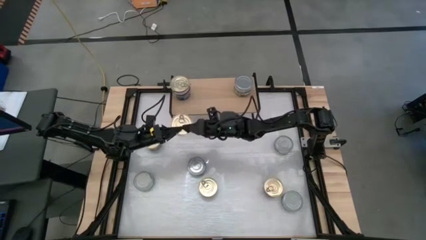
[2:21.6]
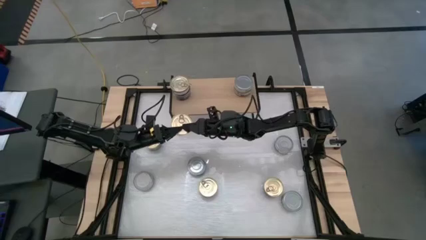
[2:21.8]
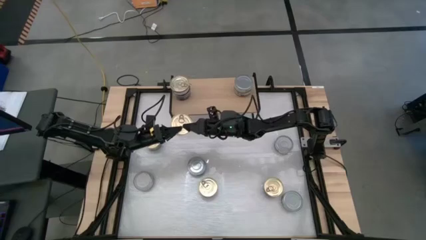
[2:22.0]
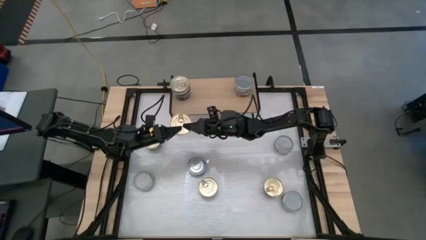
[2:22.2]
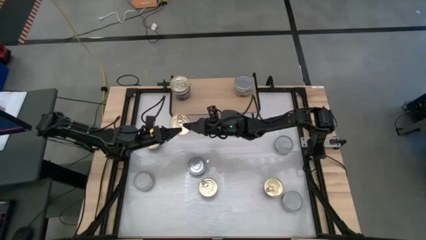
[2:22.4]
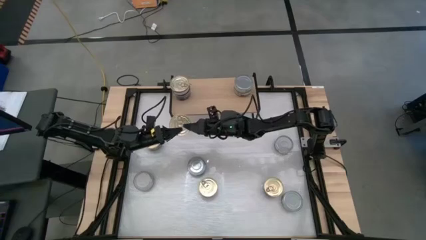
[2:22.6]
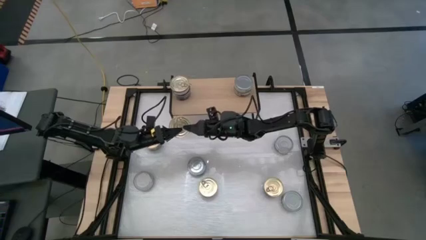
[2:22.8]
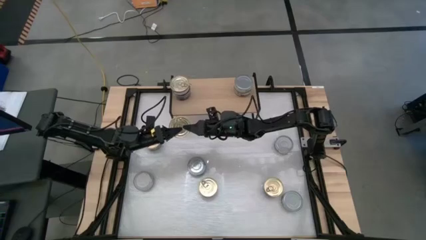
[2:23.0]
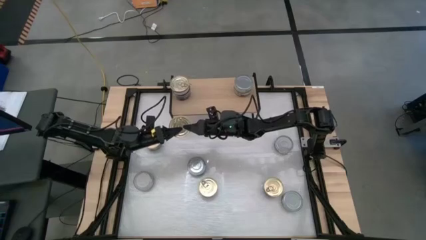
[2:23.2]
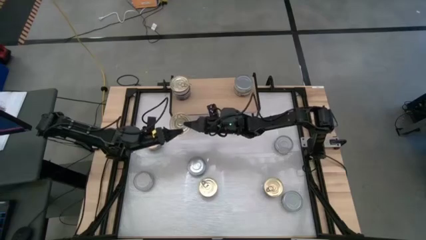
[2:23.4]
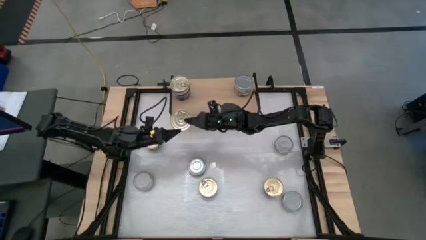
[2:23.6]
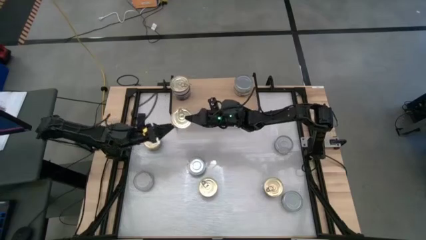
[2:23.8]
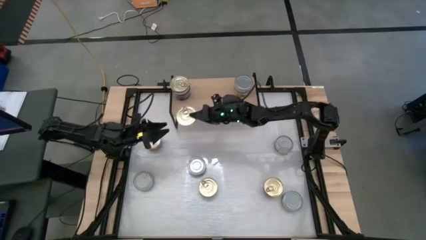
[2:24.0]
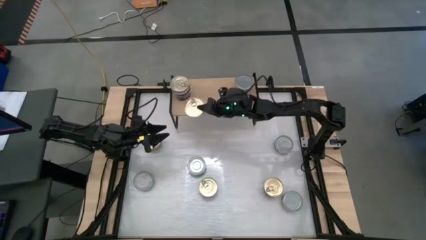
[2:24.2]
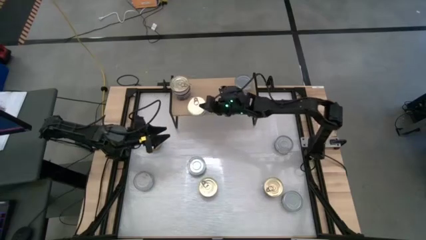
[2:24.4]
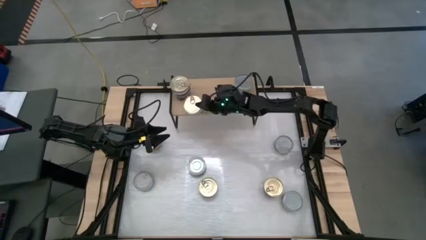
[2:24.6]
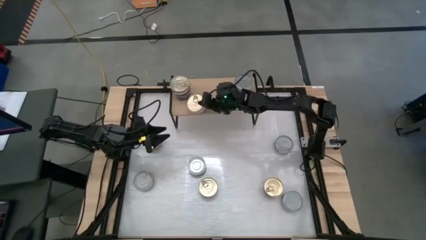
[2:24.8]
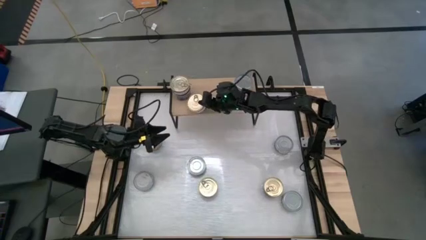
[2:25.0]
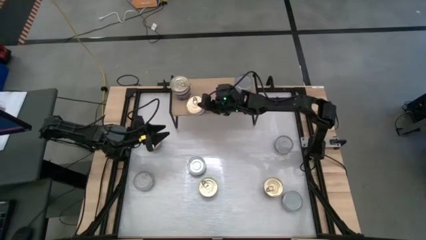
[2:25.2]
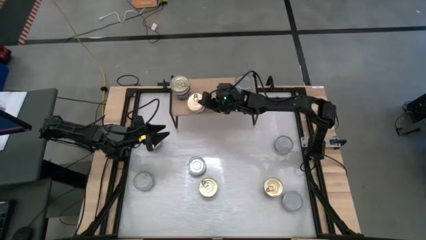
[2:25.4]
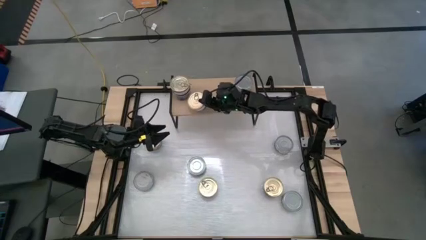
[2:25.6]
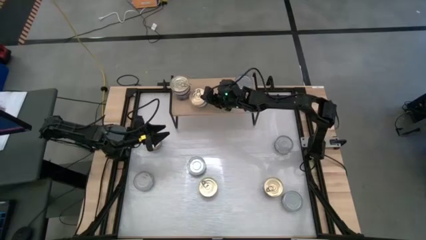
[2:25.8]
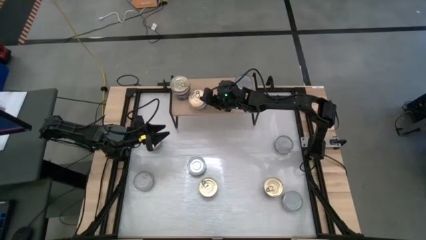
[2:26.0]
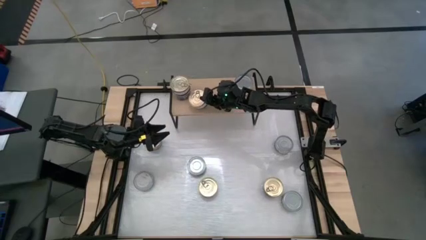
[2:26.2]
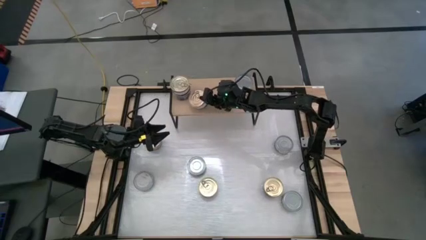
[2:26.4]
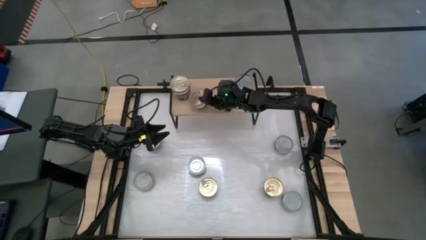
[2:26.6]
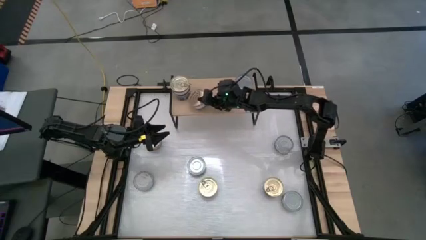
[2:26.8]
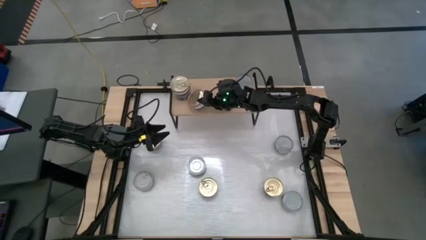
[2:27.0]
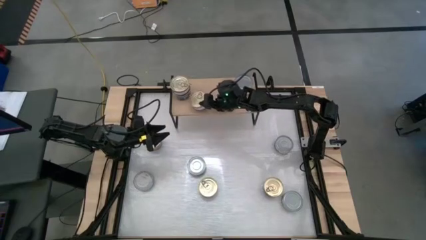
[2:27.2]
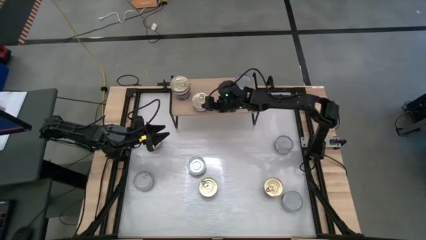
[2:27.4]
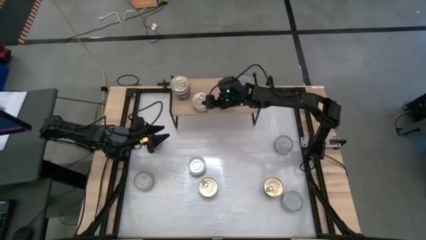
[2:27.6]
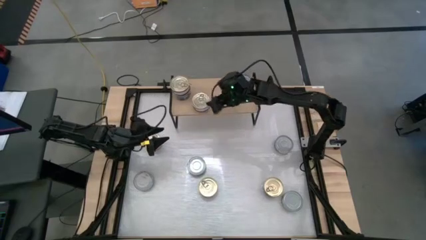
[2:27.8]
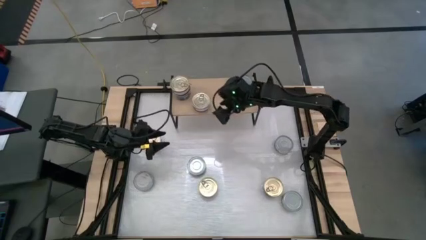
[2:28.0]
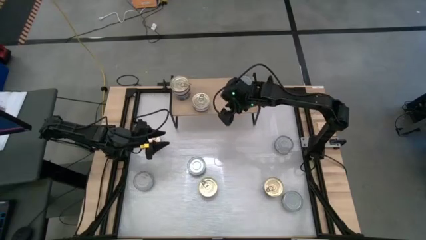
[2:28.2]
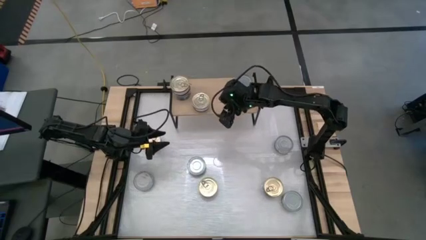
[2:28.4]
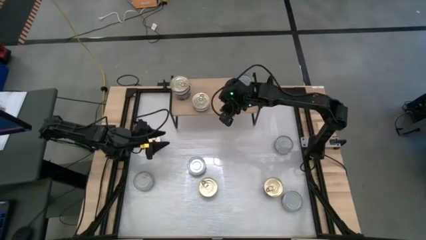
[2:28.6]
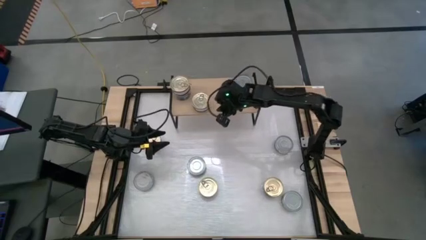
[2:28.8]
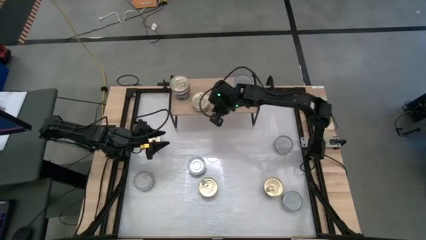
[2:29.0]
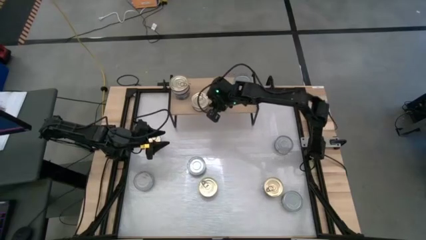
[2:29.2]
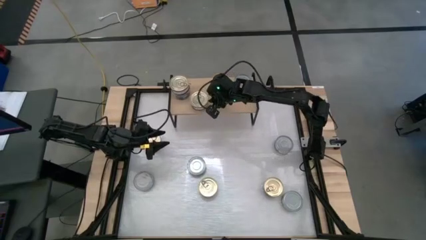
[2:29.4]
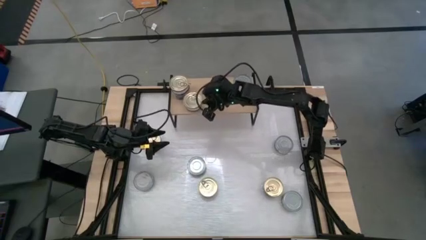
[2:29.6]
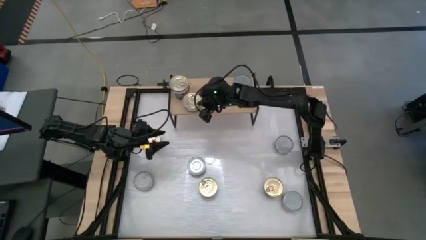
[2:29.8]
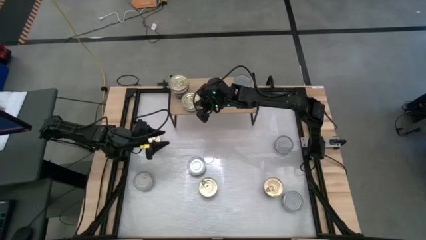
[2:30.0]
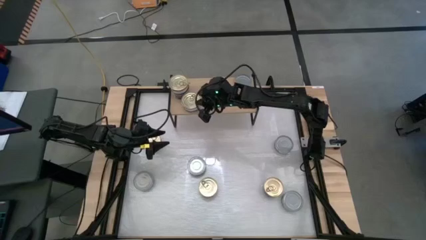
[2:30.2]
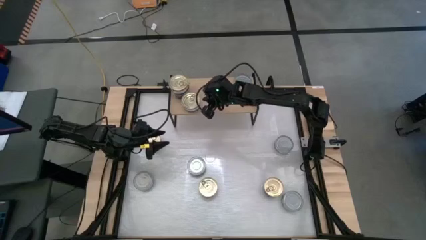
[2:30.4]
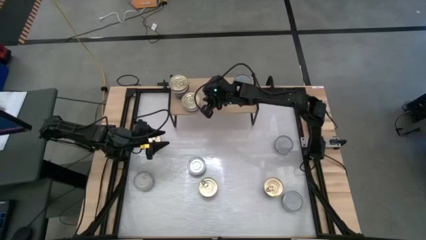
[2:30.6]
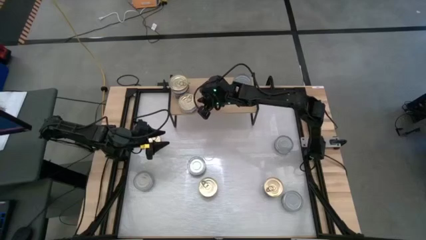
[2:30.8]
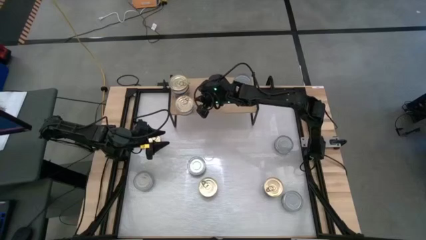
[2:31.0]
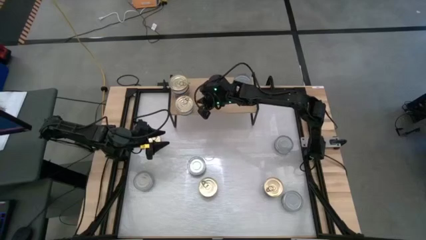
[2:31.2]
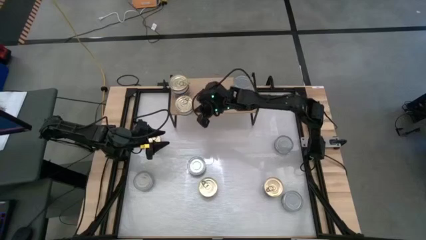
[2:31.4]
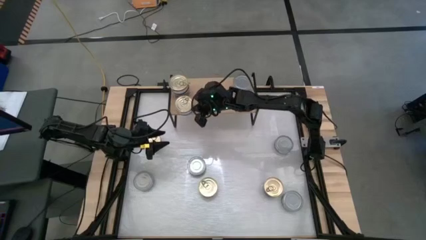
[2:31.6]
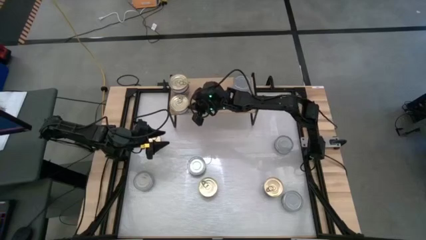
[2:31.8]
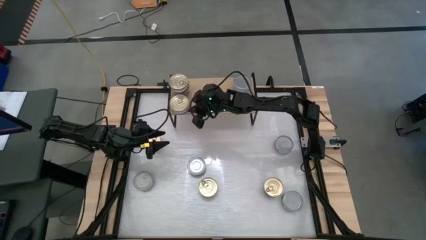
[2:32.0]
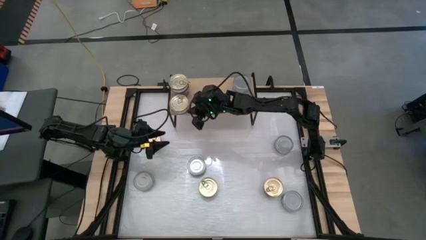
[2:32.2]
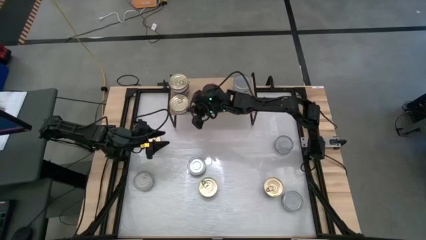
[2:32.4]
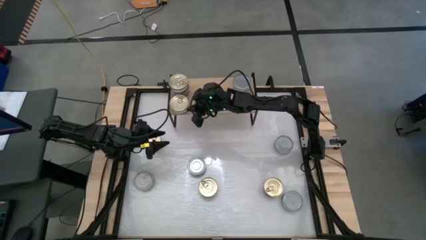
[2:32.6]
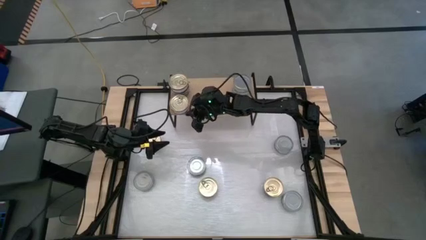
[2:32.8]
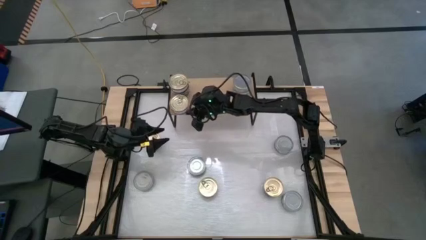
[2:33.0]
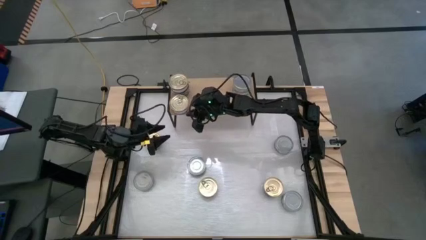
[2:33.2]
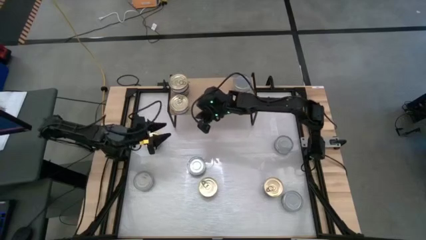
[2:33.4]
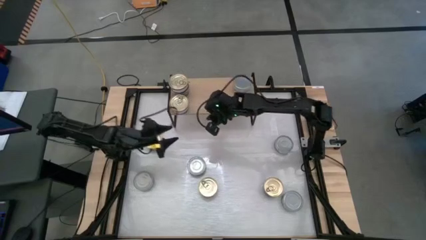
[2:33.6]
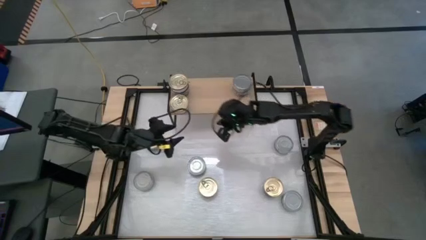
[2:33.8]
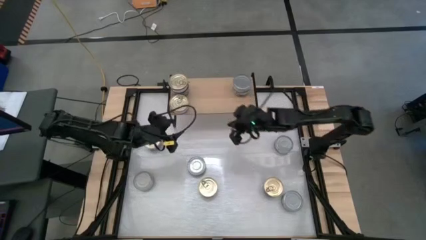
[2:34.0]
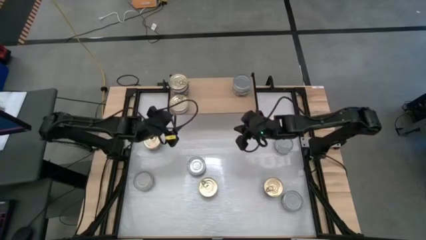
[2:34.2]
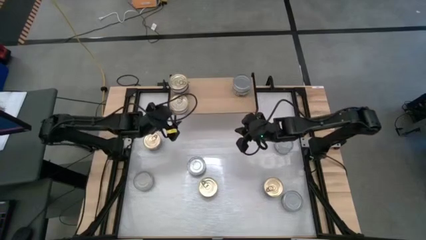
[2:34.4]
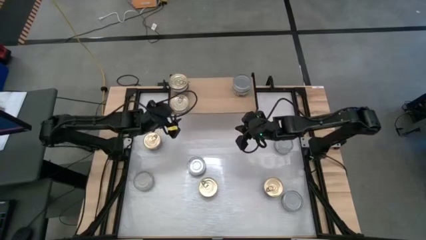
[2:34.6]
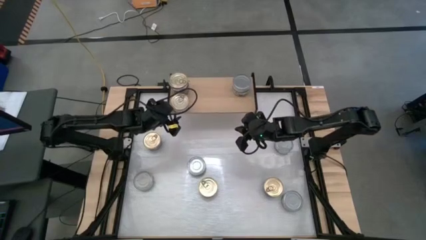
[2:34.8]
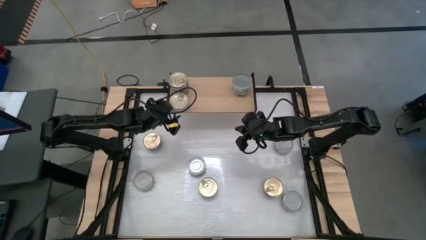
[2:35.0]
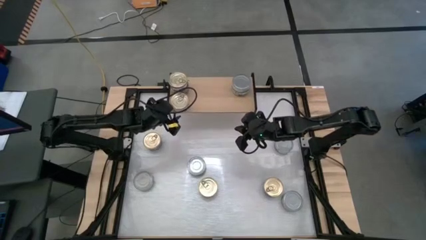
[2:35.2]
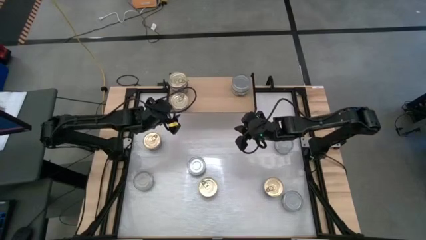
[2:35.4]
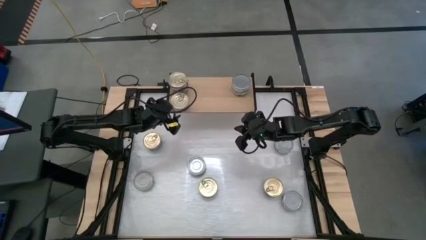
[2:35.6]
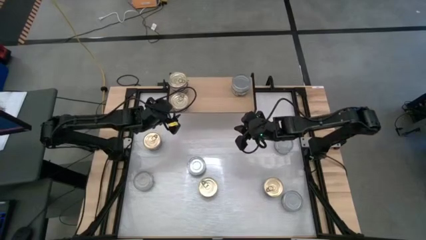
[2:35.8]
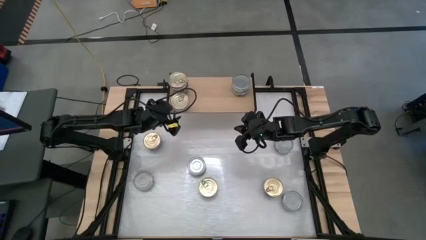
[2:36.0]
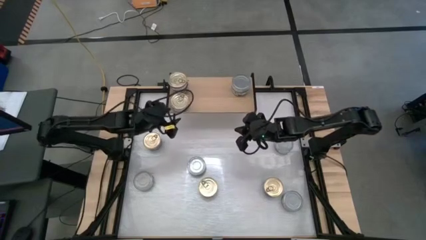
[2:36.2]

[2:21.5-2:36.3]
Task: Stack canned seafood by type on shelf
Put the blue pink tuna can on the shelf aligned with the stacked blue pink tuna cans
